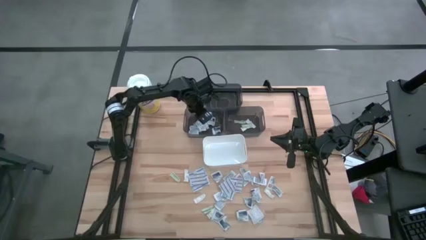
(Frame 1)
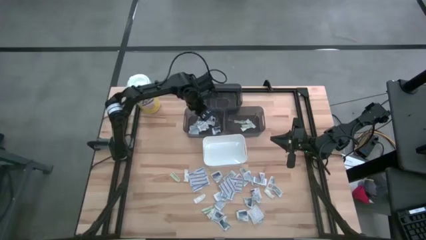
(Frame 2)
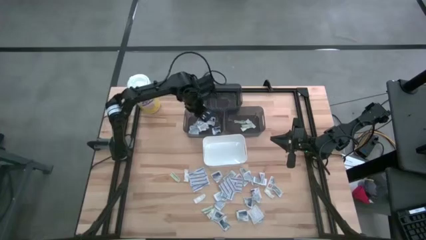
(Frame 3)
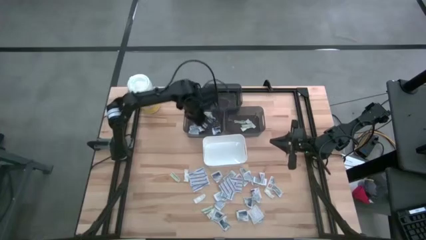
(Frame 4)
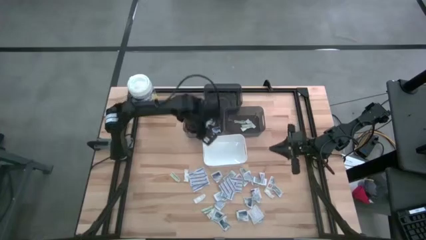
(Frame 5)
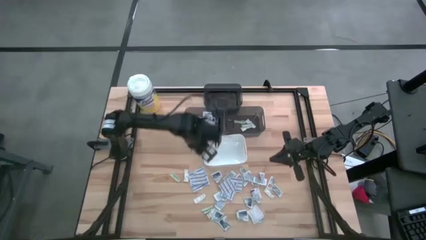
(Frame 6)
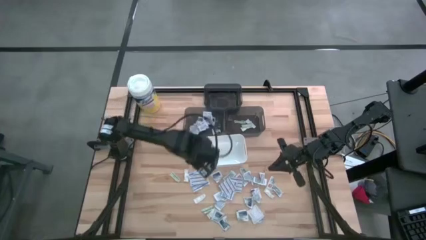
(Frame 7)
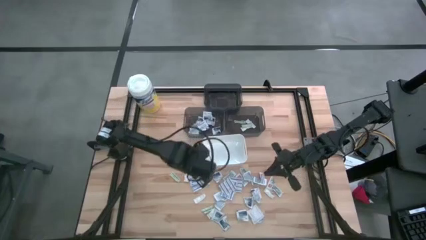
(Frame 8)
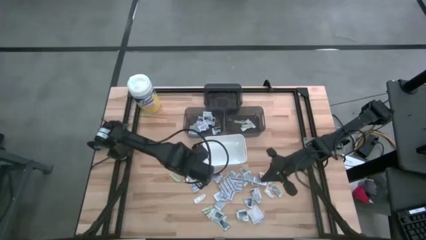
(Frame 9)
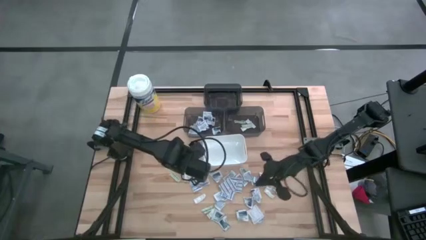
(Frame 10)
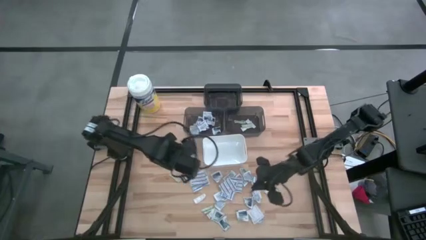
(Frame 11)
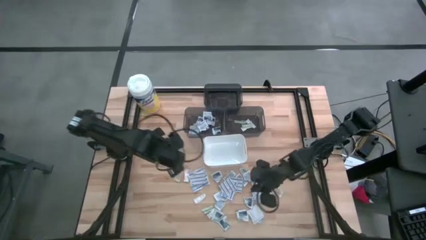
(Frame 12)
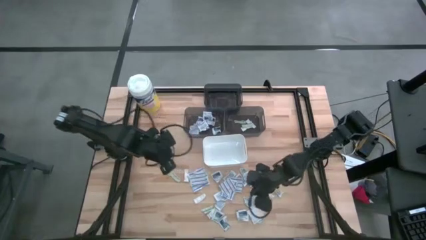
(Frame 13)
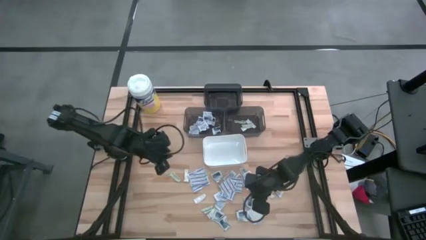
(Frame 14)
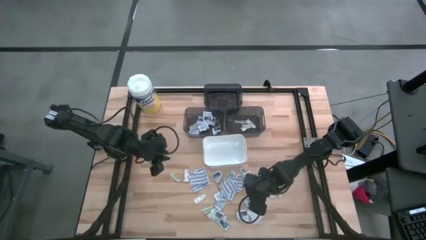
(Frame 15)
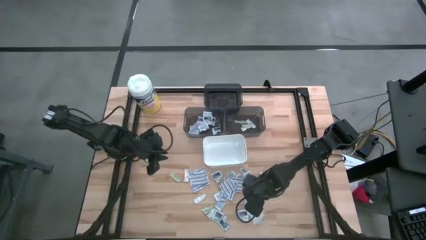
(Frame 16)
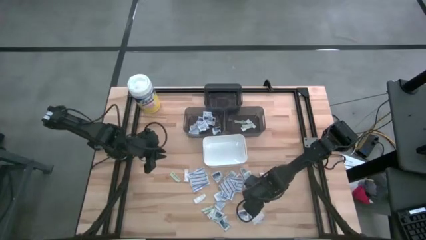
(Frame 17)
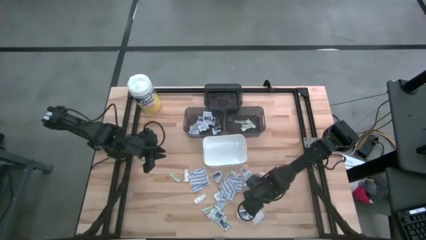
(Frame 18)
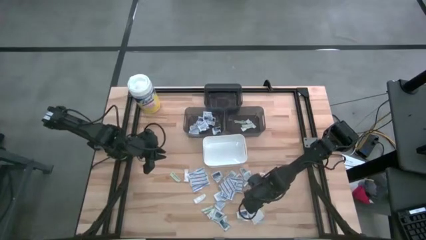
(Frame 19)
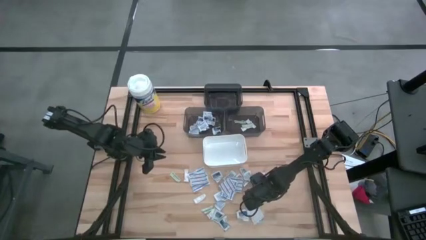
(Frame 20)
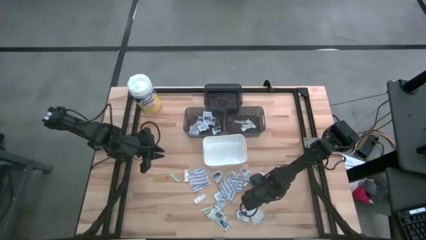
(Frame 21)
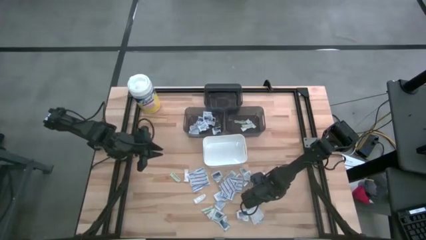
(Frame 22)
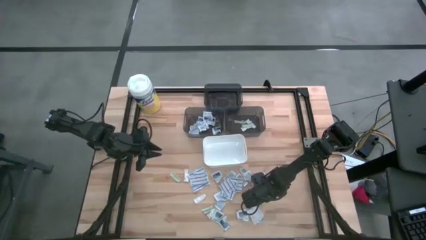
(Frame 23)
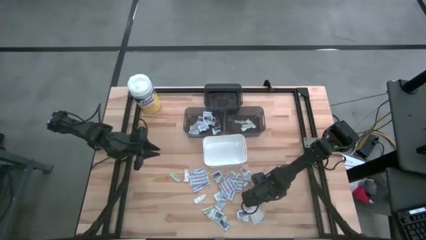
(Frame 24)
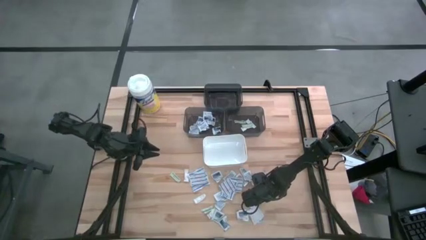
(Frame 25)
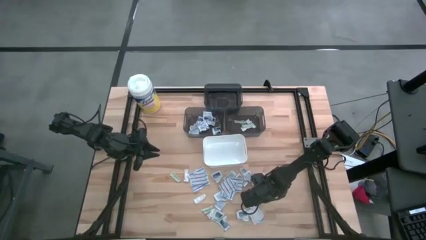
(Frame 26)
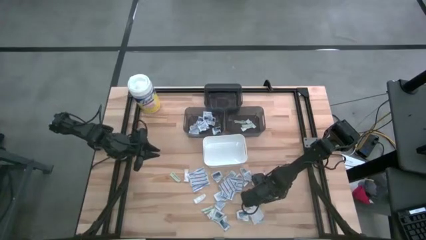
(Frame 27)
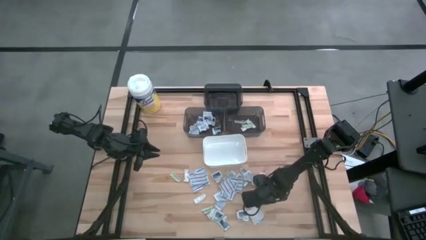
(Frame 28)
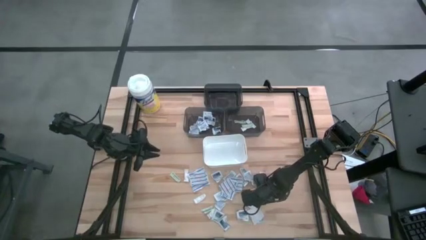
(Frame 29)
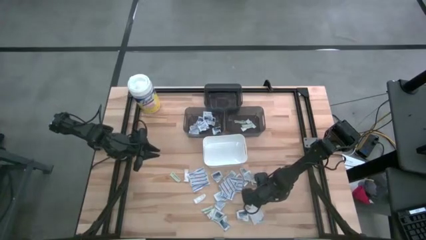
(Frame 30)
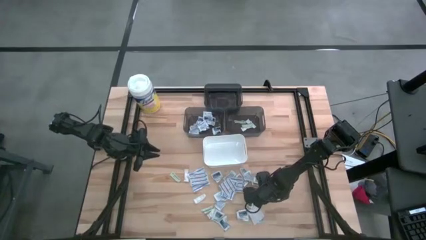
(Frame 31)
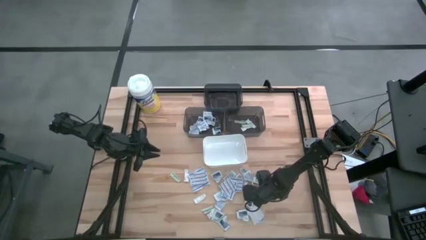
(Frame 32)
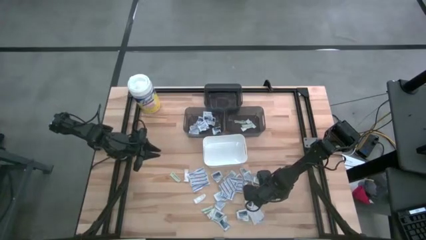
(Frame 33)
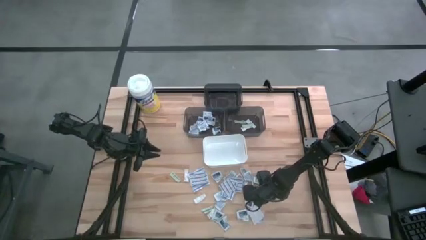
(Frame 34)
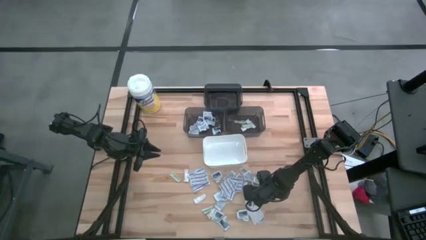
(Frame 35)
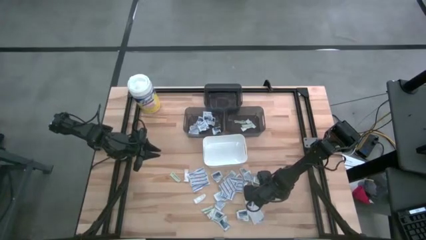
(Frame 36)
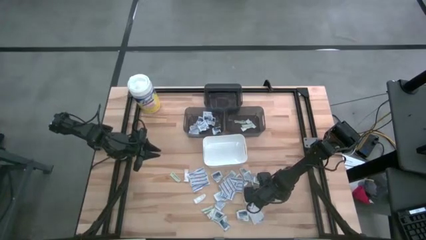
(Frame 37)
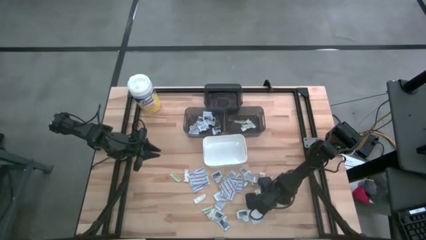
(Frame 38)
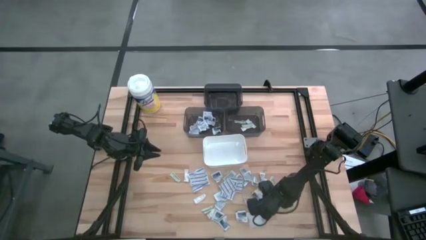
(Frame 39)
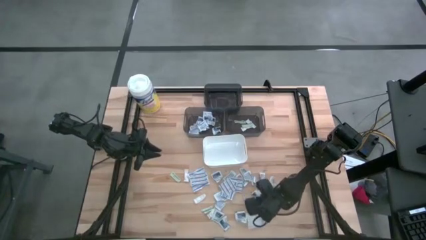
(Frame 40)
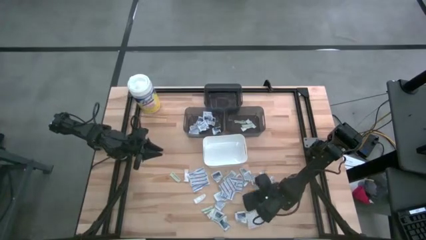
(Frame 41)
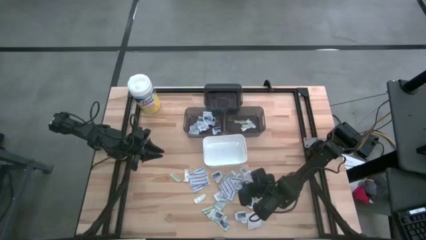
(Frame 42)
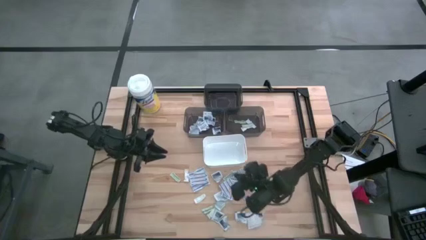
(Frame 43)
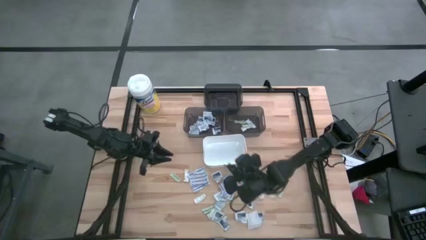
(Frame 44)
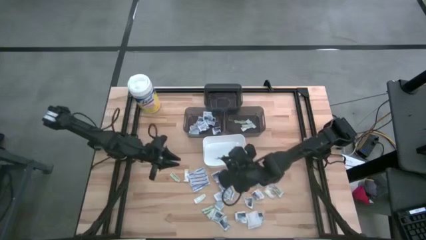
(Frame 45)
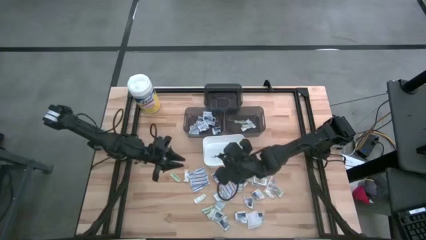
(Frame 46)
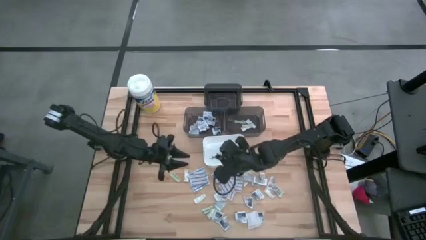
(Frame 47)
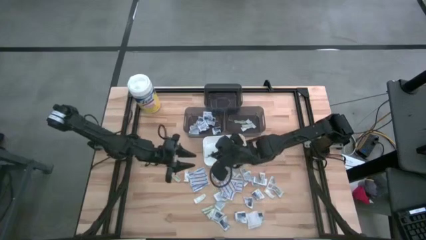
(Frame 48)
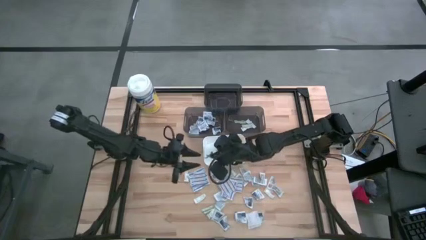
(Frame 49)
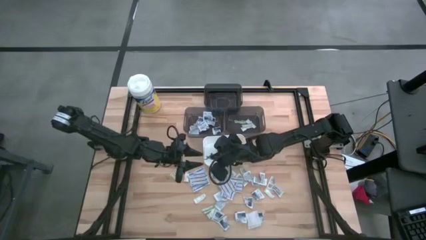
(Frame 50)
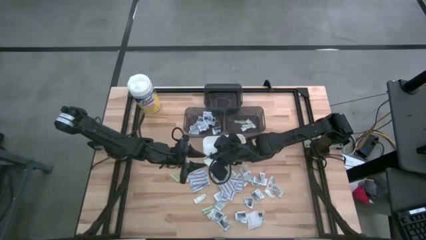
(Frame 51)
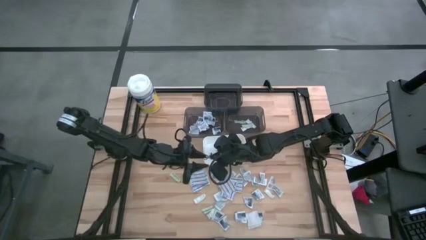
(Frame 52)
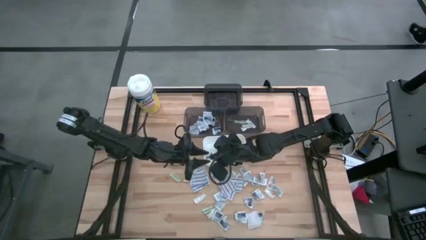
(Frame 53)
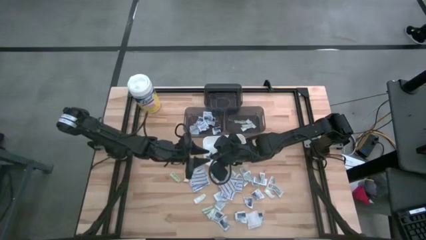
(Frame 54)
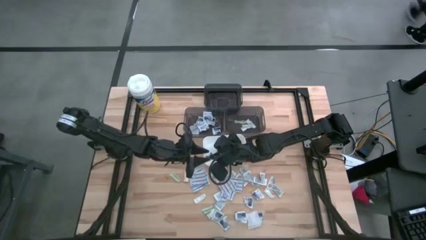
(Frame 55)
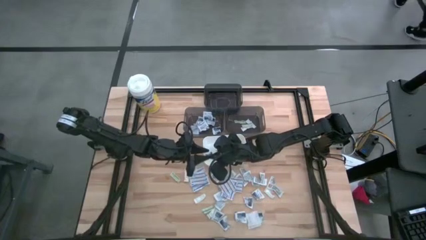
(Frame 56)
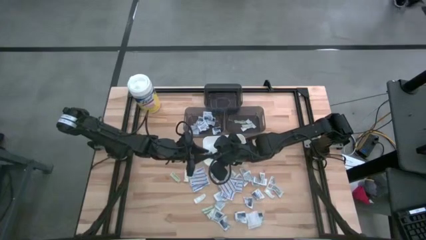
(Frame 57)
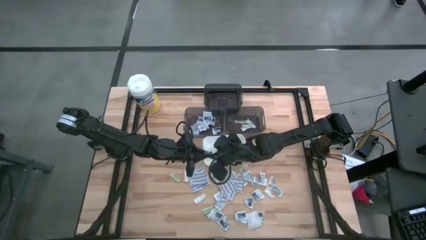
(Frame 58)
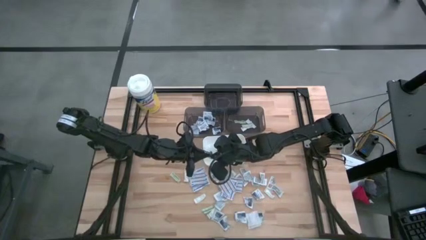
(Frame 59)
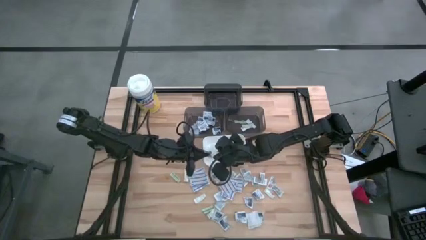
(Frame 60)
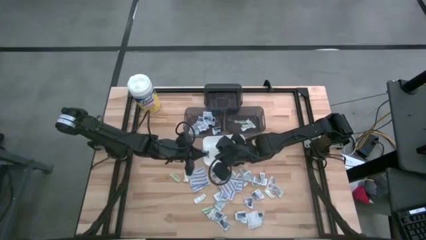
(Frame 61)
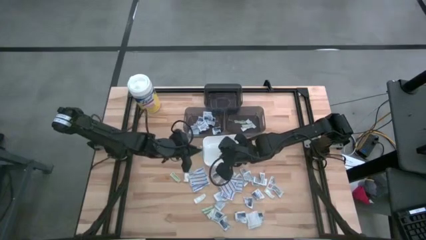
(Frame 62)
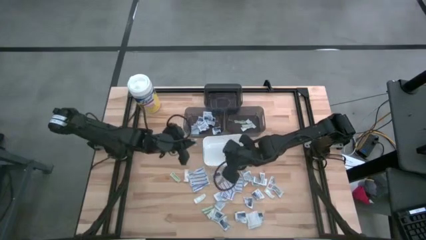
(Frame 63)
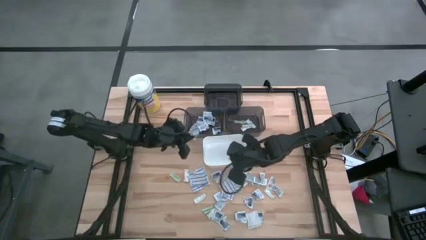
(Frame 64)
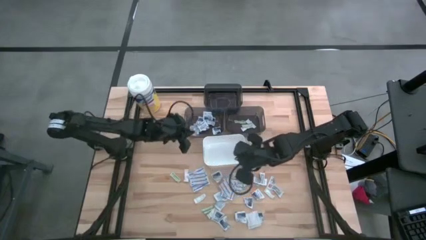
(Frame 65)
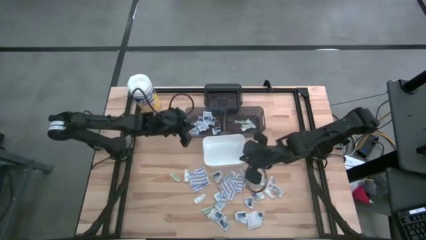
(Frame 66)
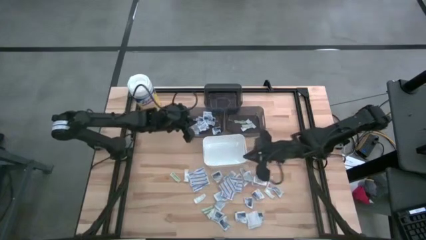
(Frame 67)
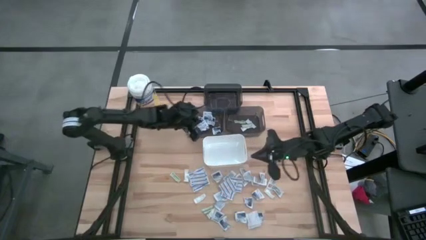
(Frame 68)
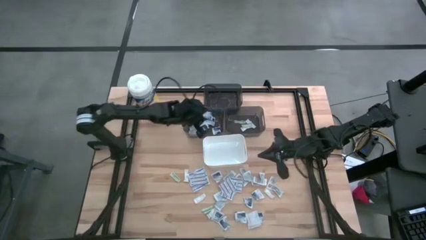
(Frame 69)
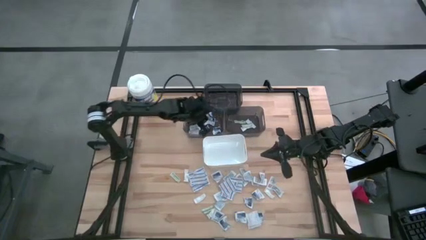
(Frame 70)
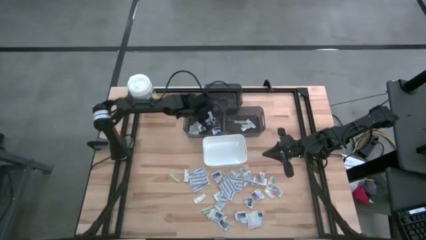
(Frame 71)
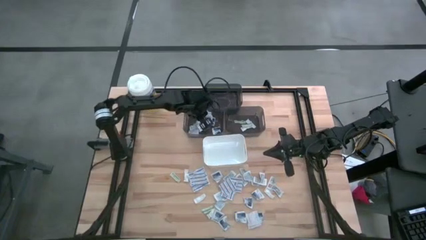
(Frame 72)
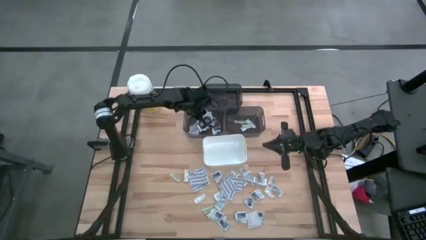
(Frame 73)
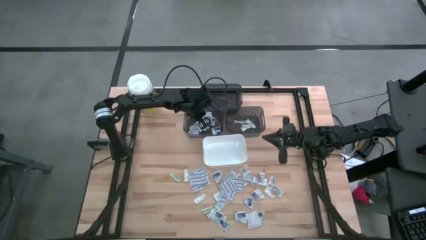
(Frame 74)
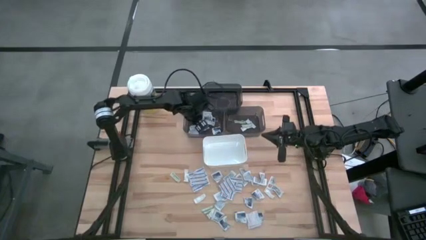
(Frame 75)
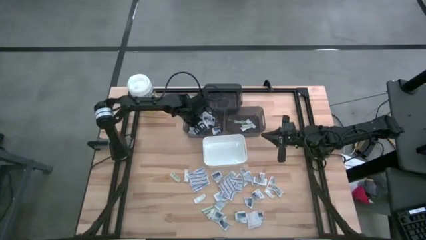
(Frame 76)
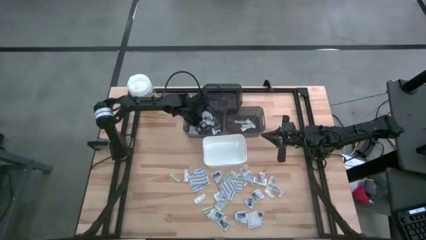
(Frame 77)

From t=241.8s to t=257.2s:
Task: Pick & Place First Aid Supplies
Put the alcohol pad into the bottom left black bin
